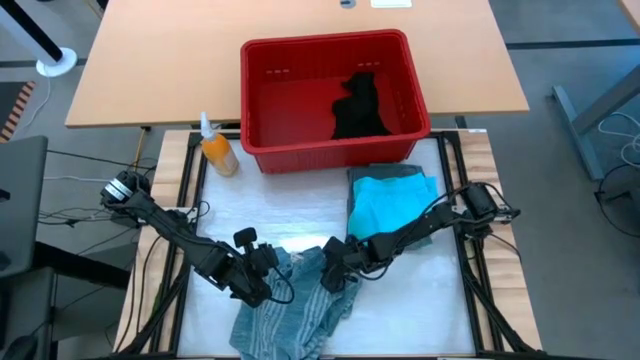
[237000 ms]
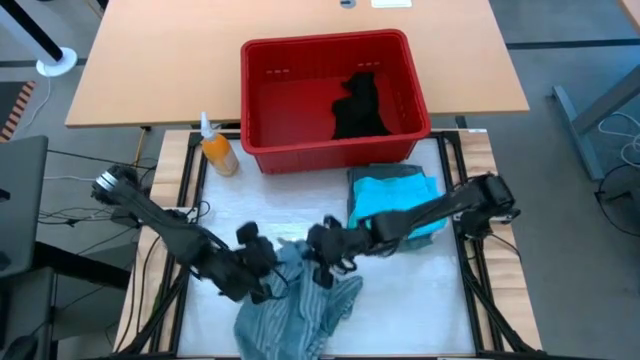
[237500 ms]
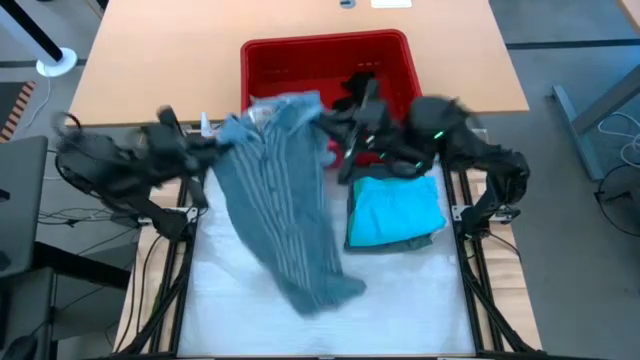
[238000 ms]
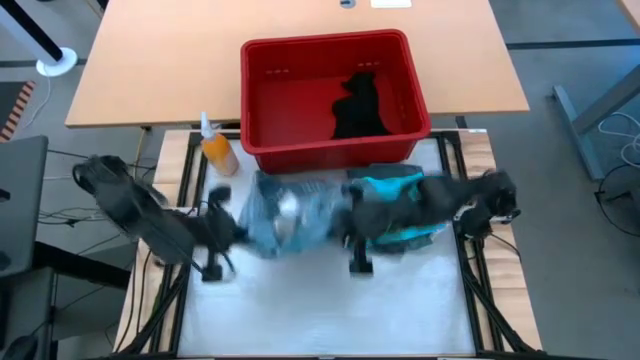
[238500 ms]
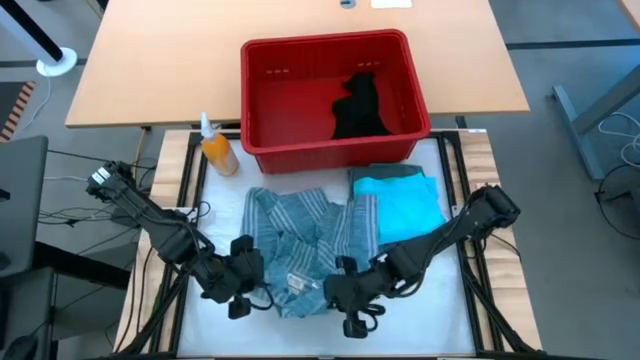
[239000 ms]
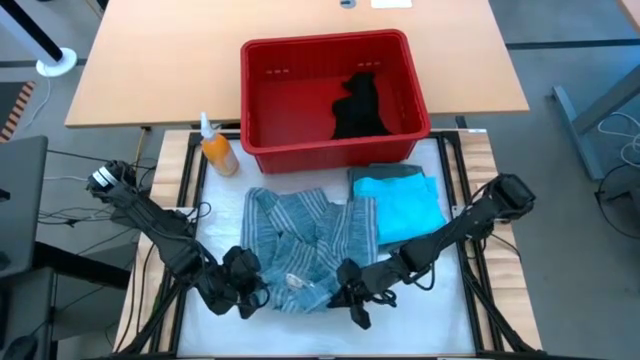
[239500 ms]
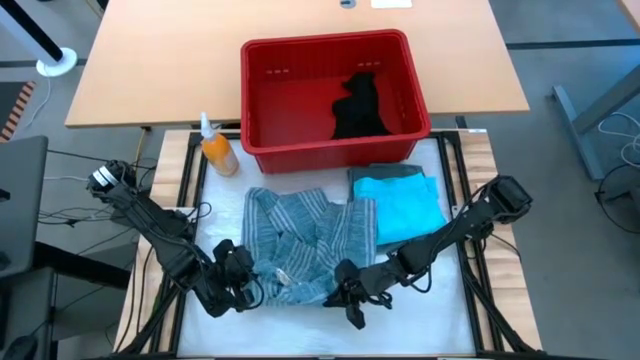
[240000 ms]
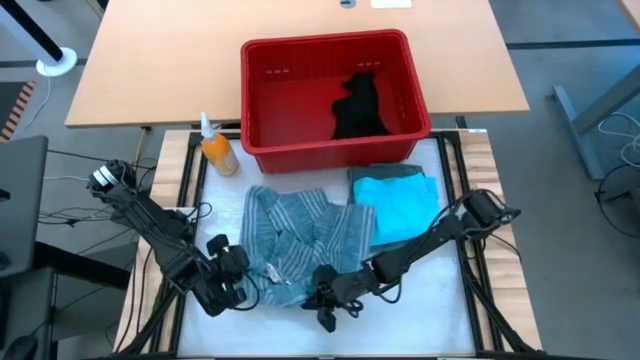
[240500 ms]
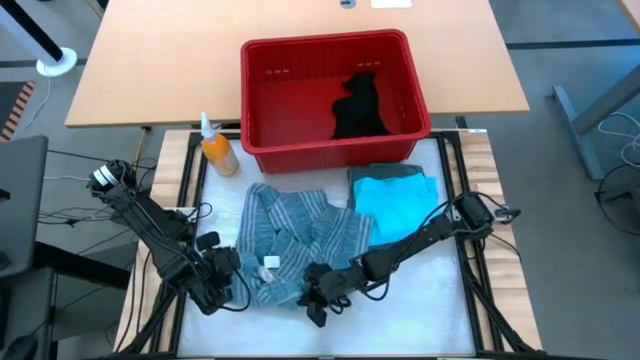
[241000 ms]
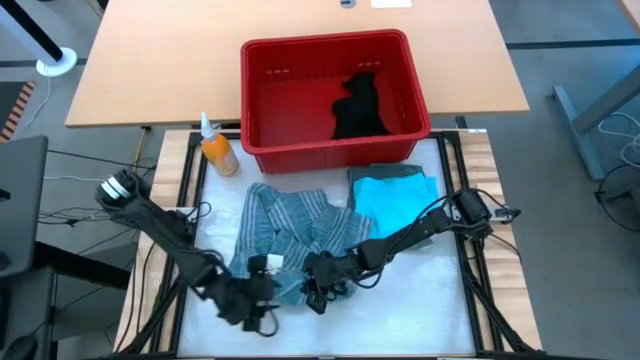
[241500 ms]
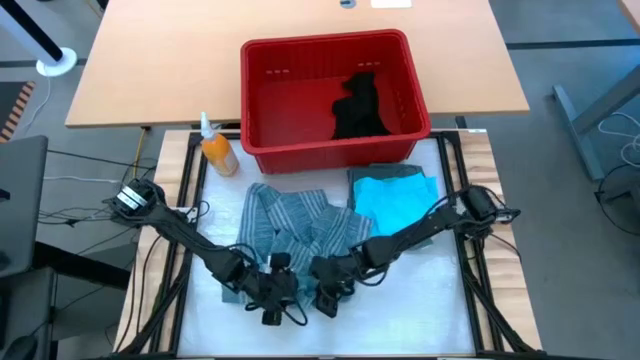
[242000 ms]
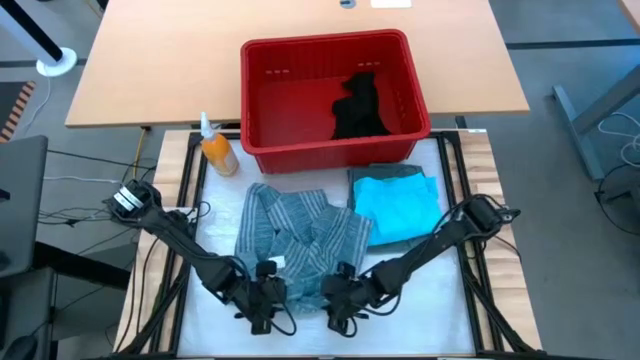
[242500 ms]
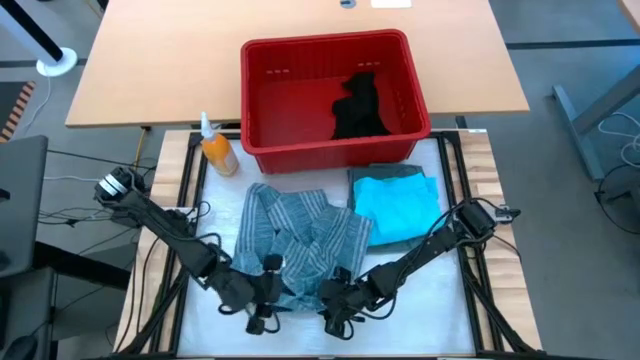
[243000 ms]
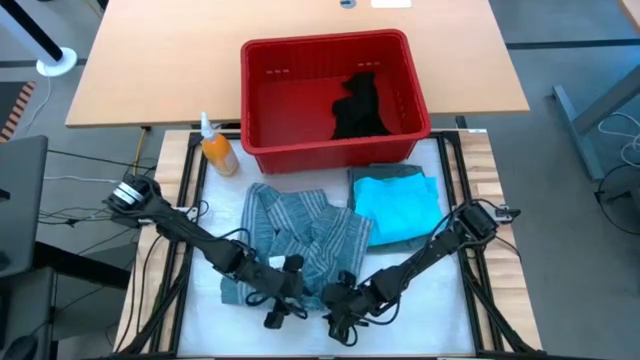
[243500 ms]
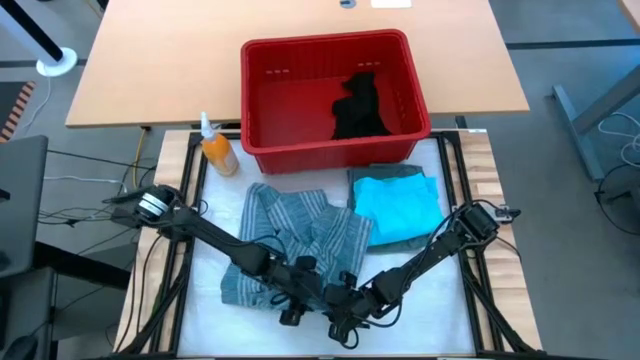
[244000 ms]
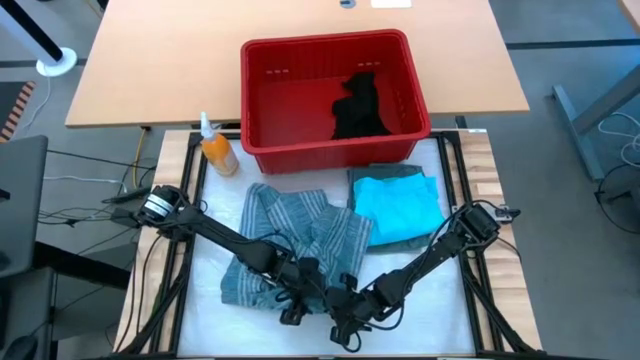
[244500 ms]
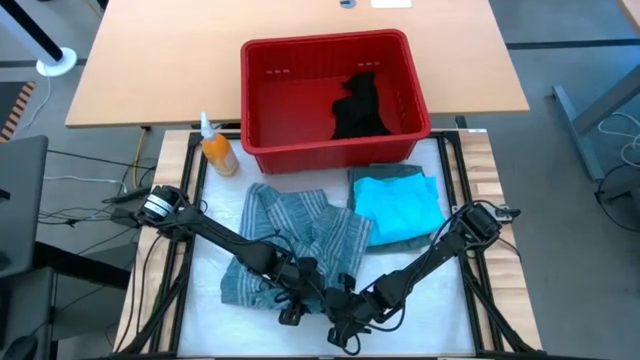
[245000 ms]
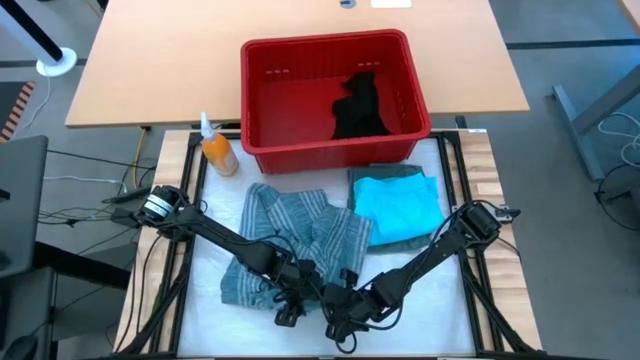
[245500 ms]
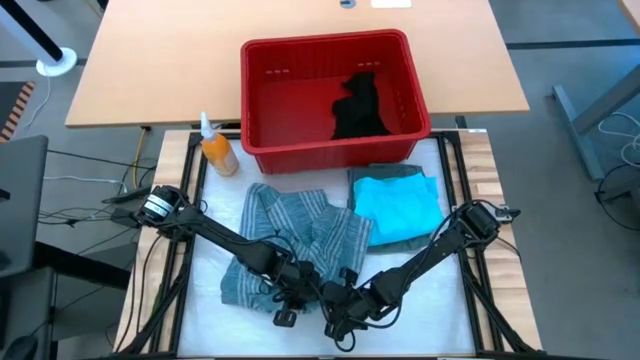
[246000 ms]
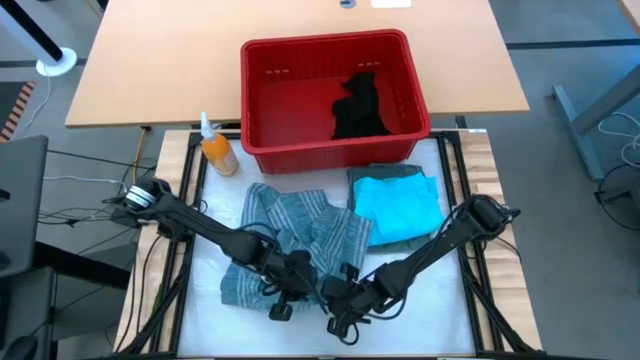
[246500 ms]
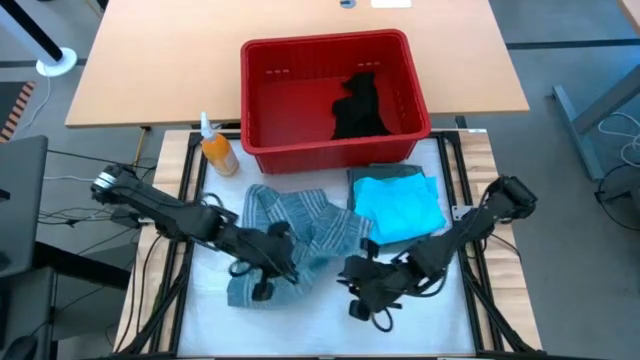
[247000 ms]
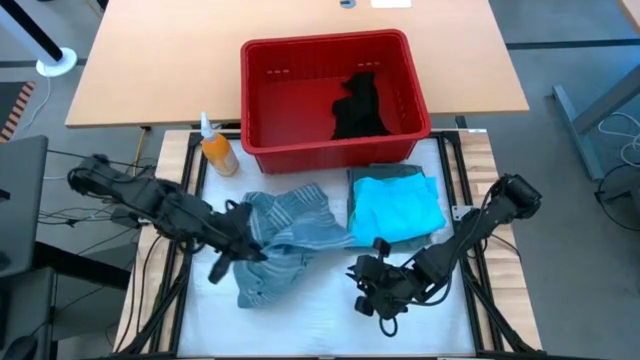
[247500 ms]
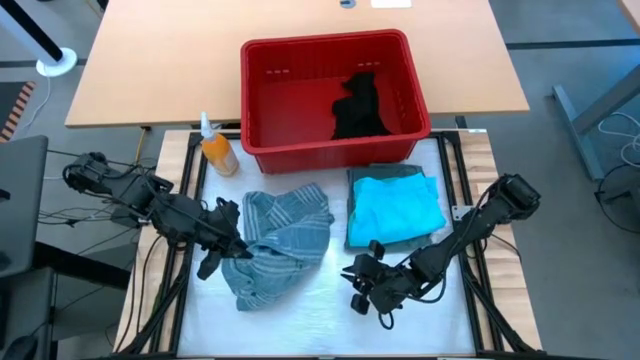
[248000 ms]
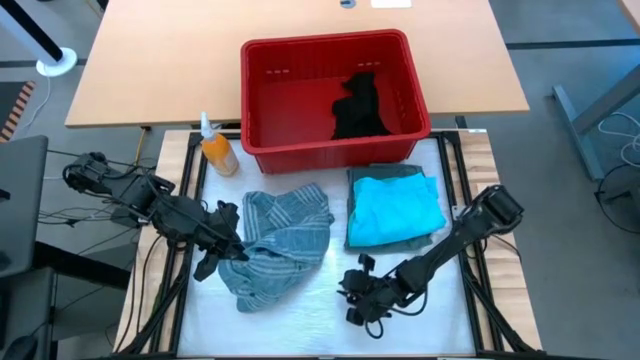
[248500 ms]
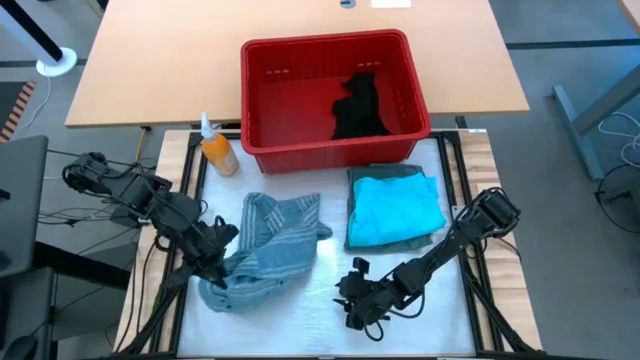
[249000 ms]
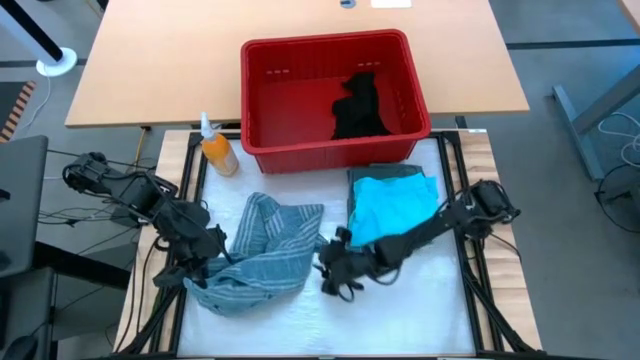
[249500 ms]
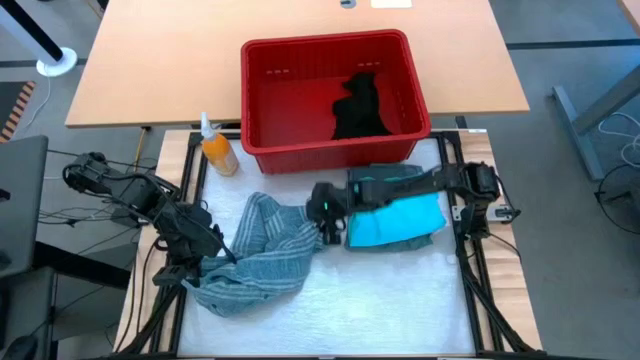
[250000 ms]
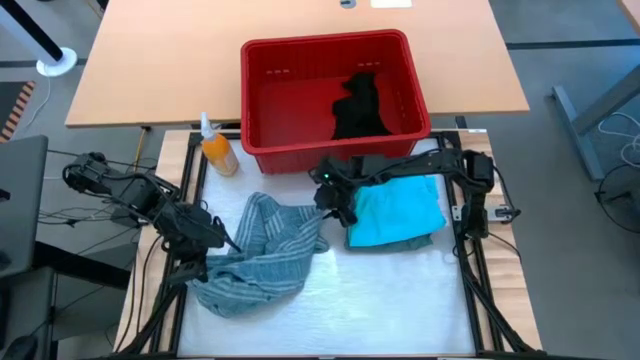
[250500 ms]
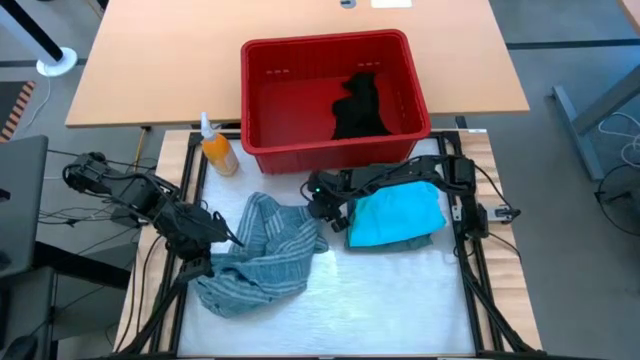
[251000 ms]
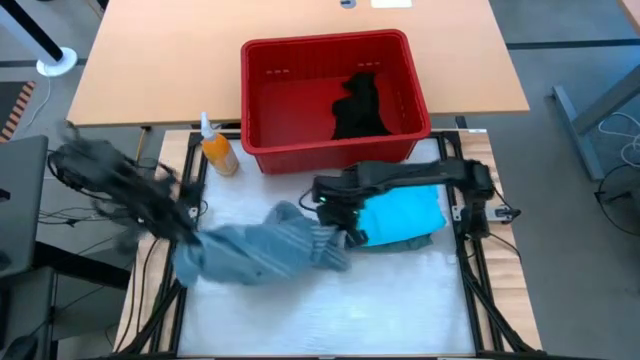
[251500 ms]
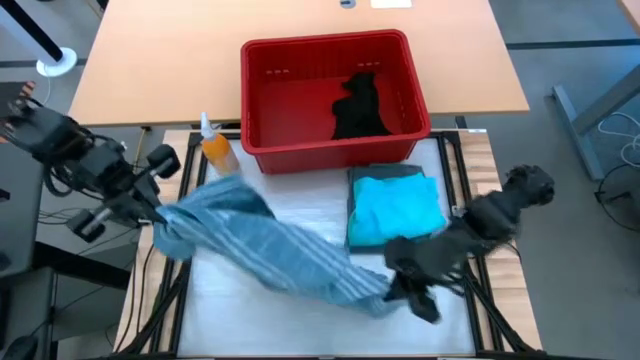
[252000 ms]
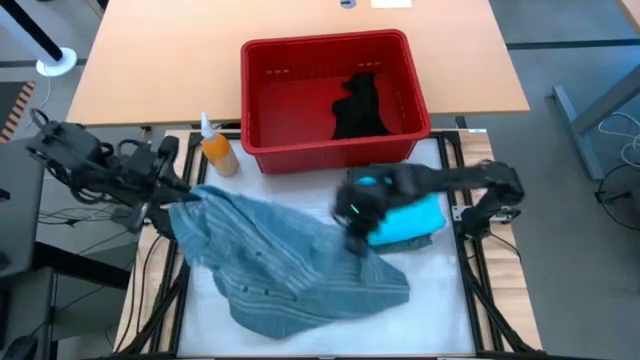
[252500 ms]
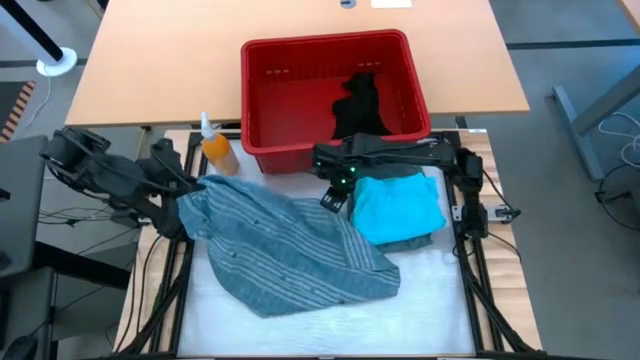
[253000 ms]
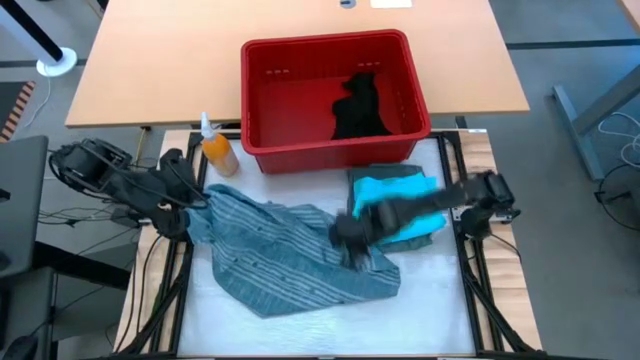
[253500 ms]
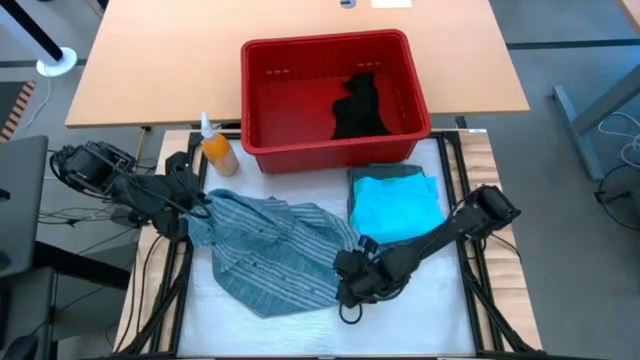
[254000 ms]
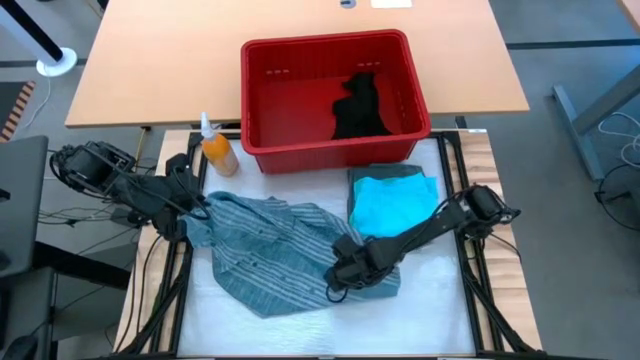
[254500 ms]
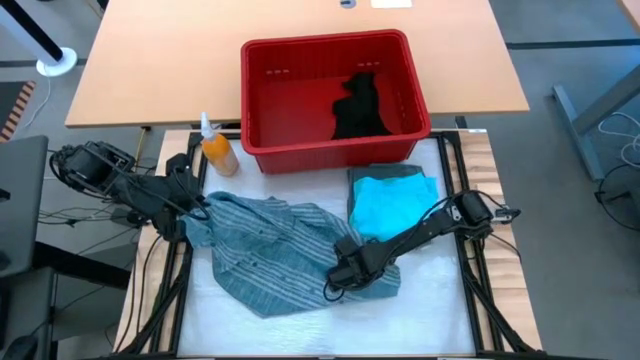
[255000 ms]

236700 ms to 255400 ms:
Task: Fold Laundry from Bin
Fold the blue patterned polo shirt

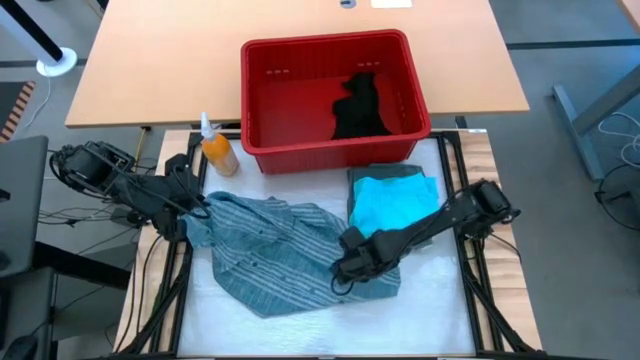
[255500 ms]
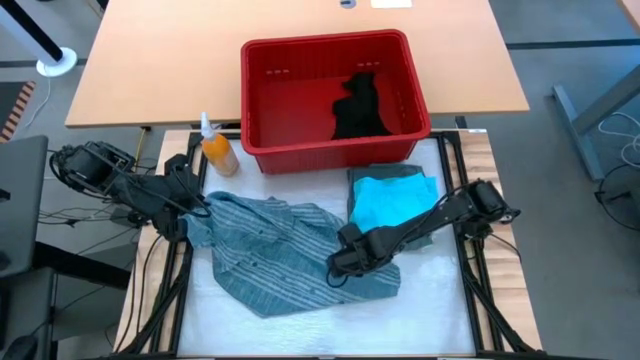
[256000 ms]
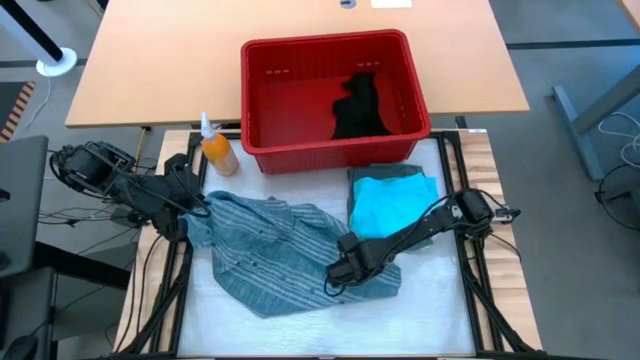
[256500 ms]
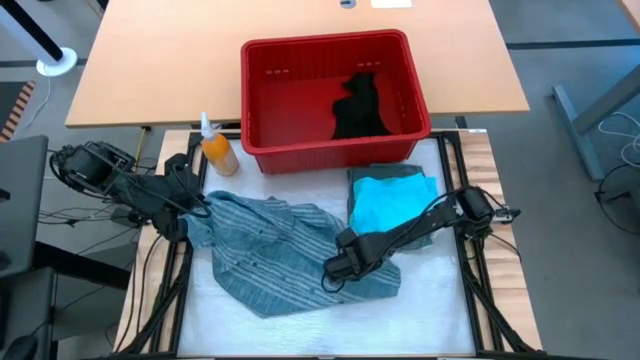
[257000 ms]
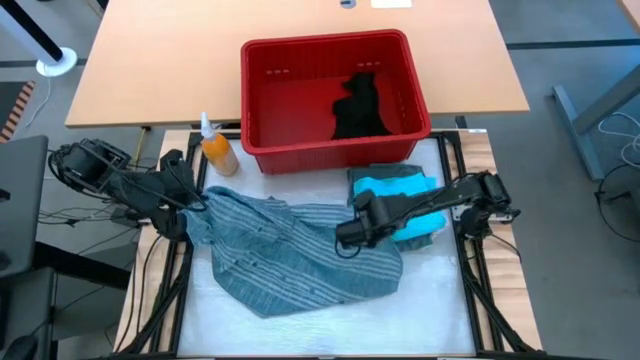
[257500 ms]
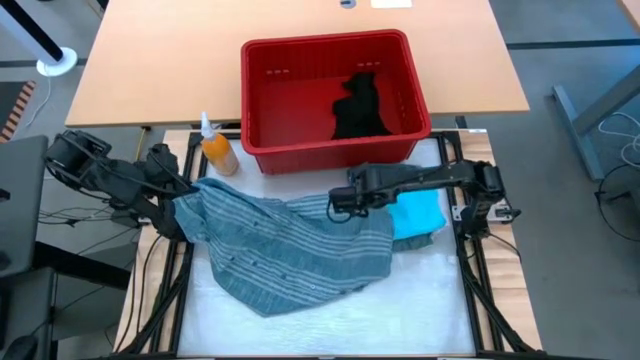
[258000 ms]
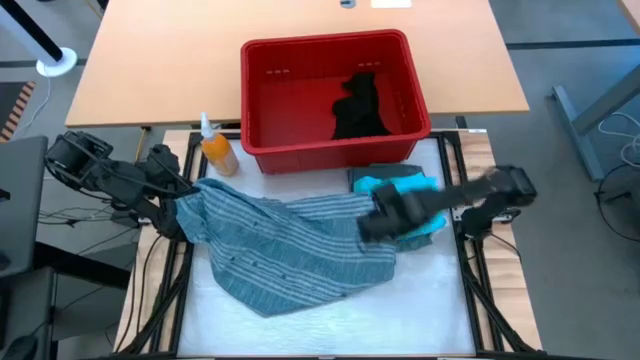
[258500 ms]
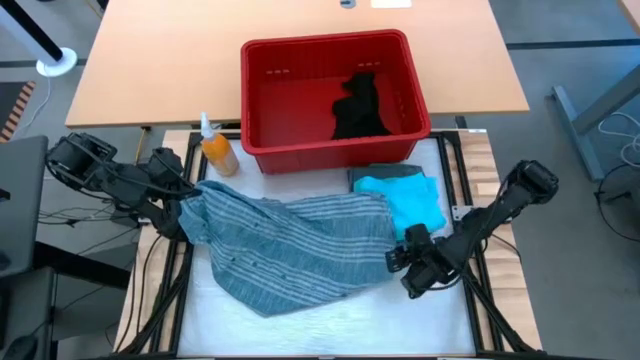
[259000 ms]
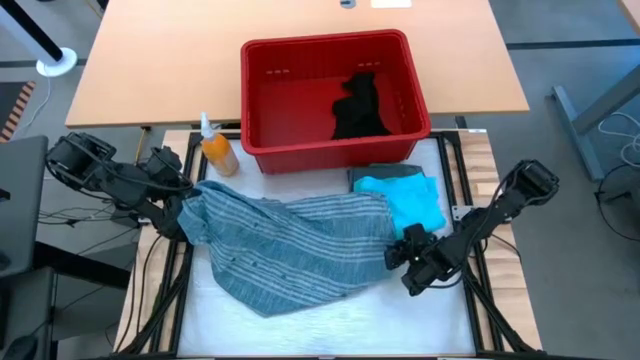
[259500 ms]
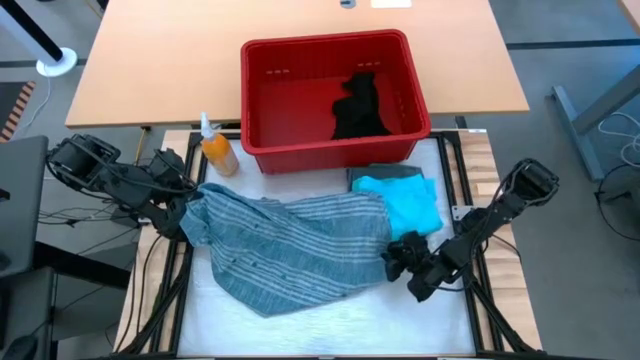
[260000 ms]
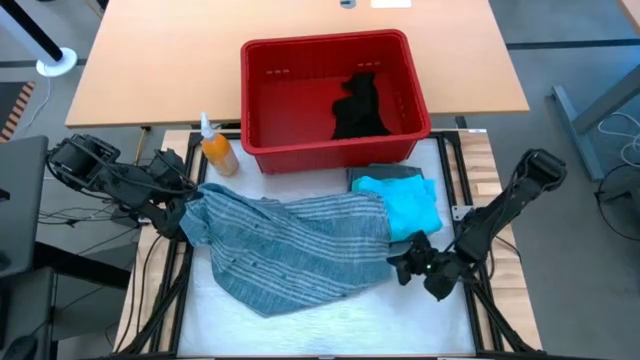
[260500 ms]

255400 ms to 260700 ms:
Fold the blue patterned polo shirt
